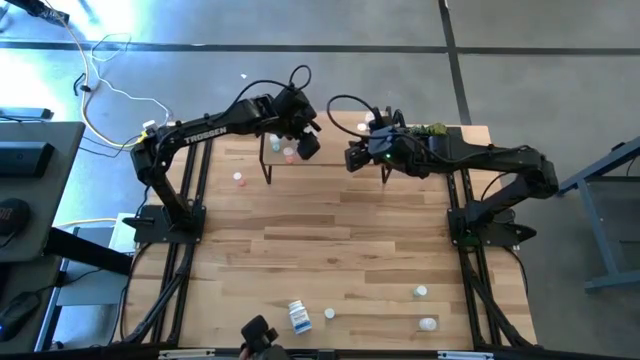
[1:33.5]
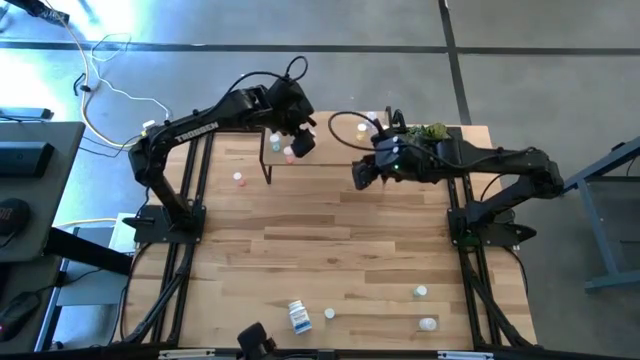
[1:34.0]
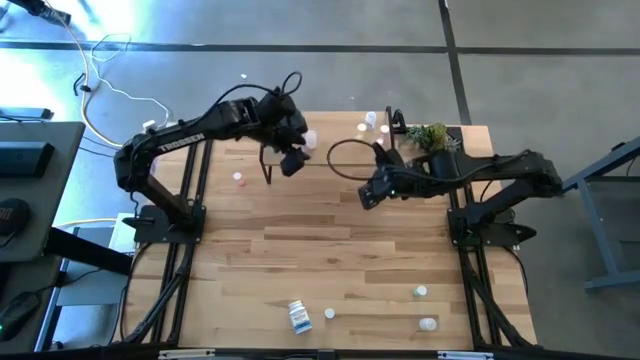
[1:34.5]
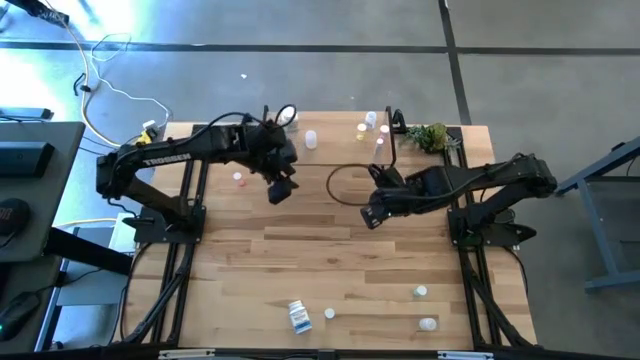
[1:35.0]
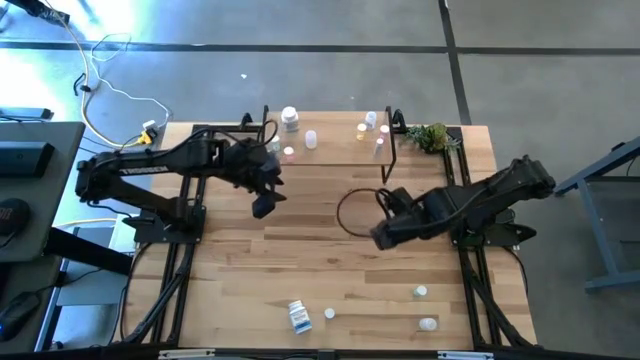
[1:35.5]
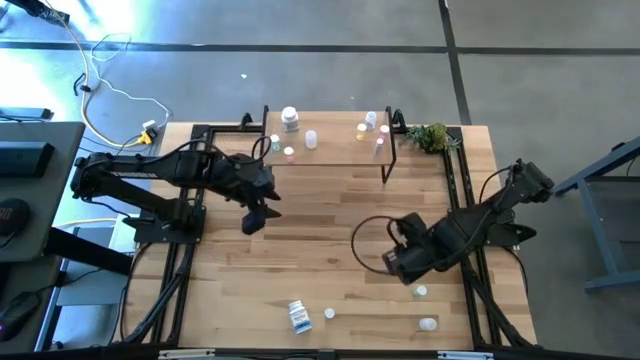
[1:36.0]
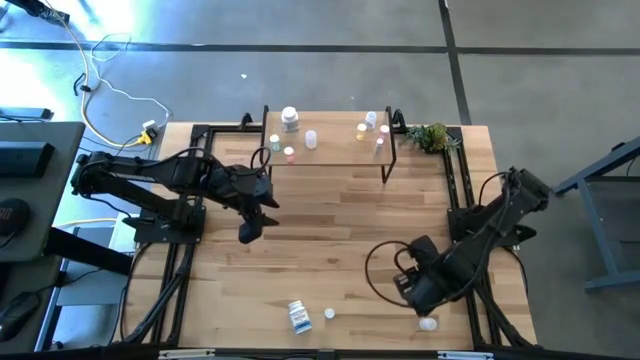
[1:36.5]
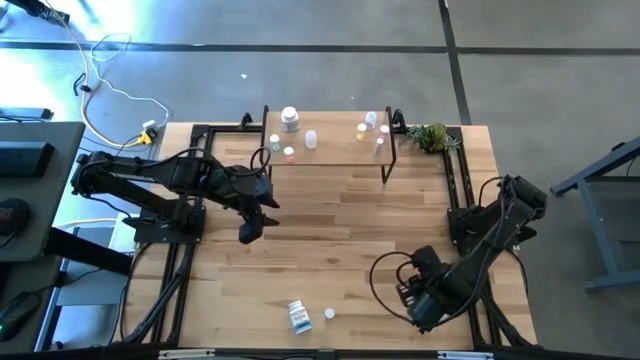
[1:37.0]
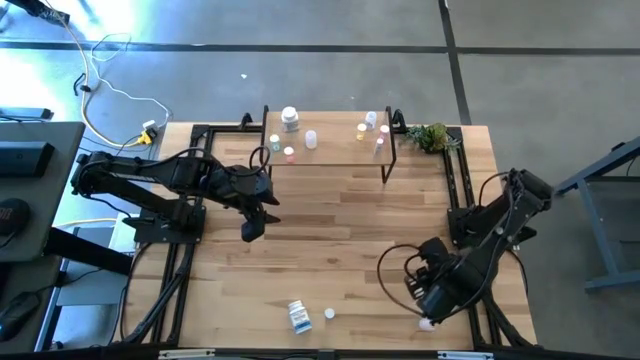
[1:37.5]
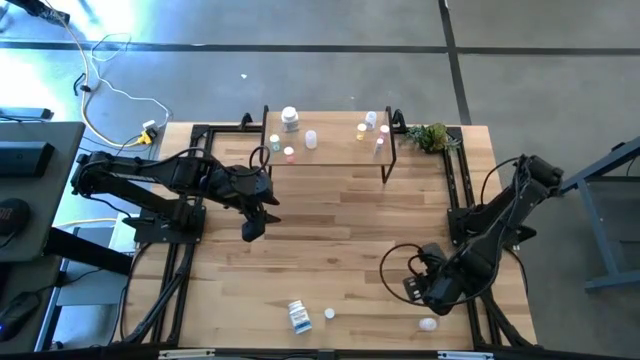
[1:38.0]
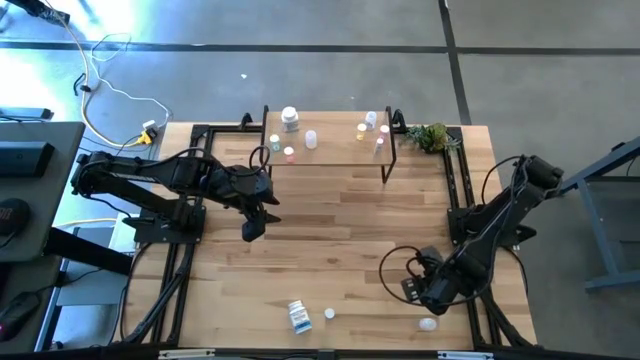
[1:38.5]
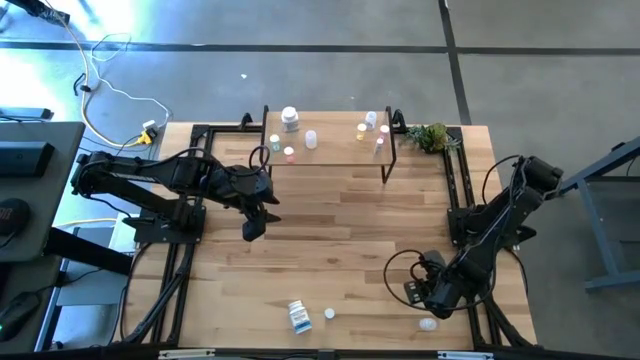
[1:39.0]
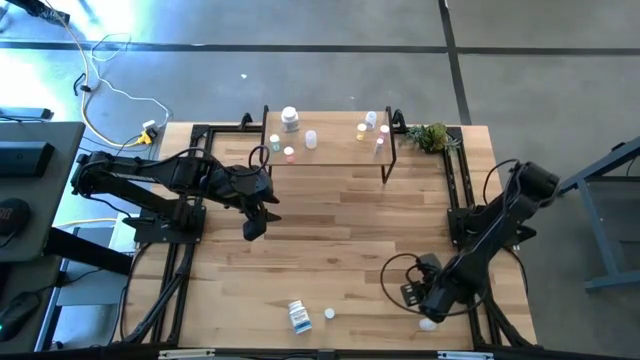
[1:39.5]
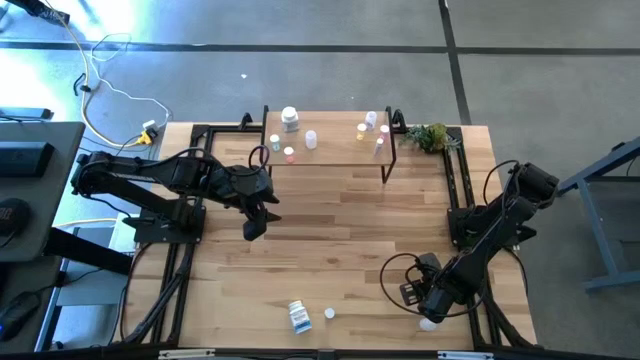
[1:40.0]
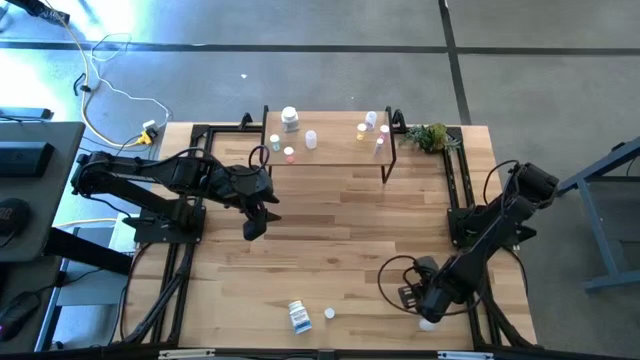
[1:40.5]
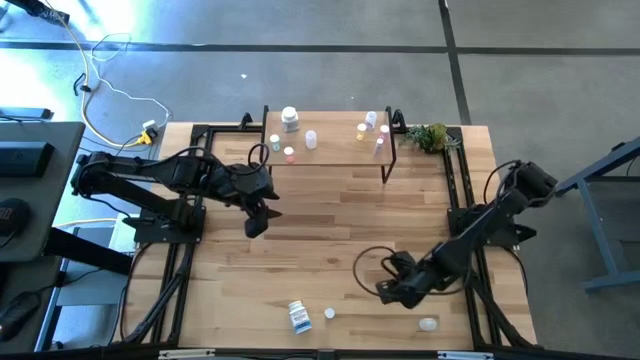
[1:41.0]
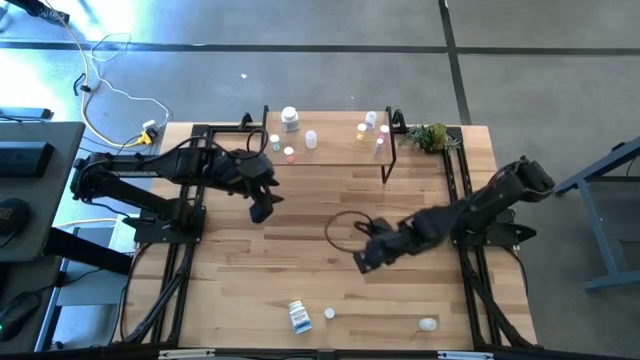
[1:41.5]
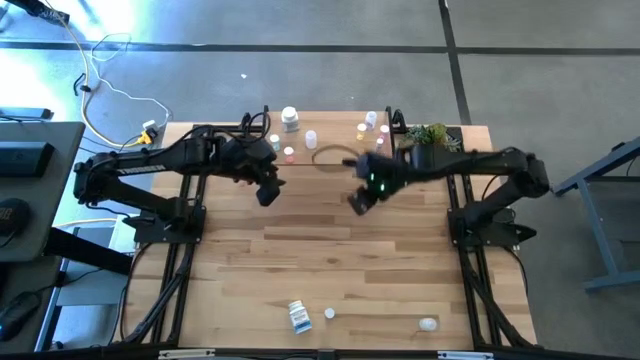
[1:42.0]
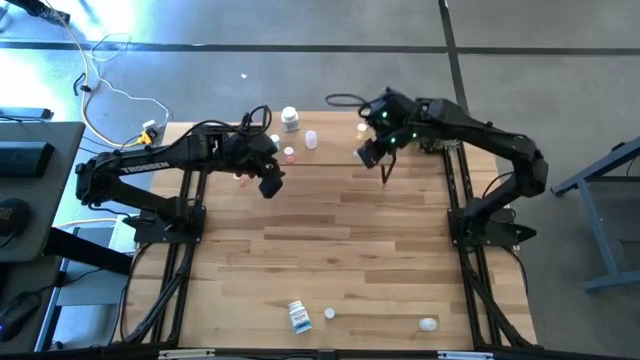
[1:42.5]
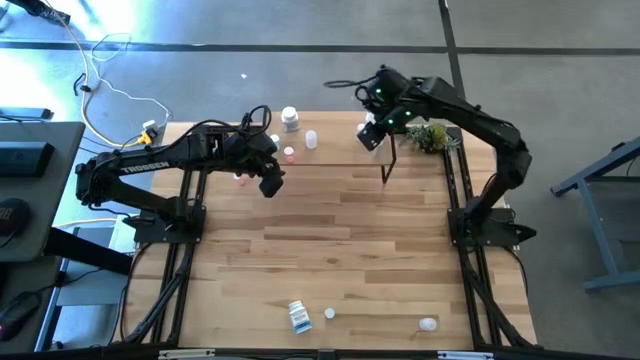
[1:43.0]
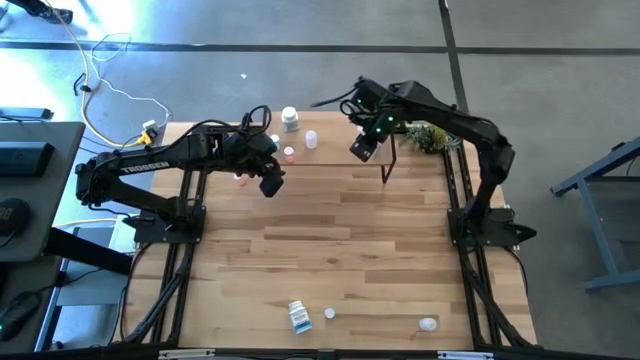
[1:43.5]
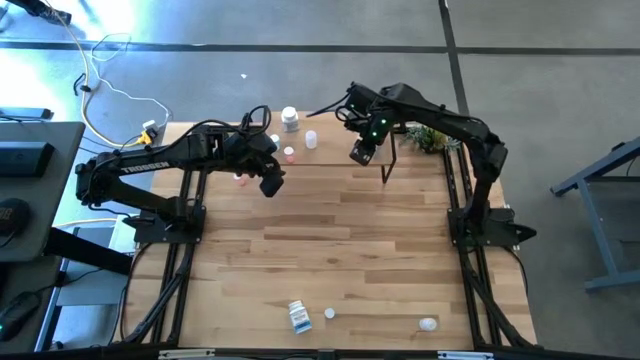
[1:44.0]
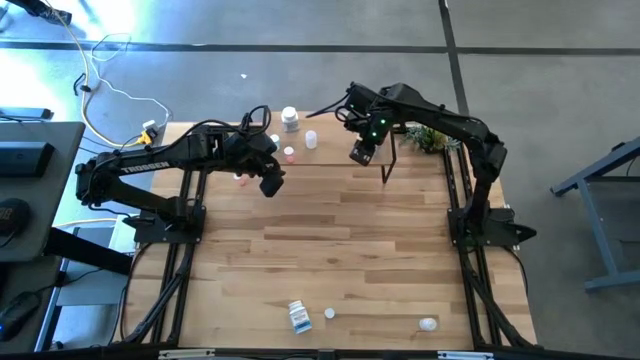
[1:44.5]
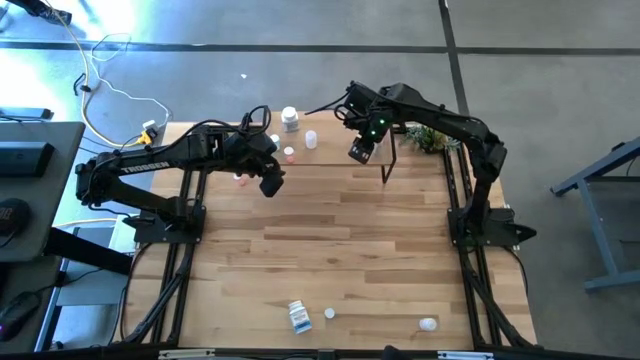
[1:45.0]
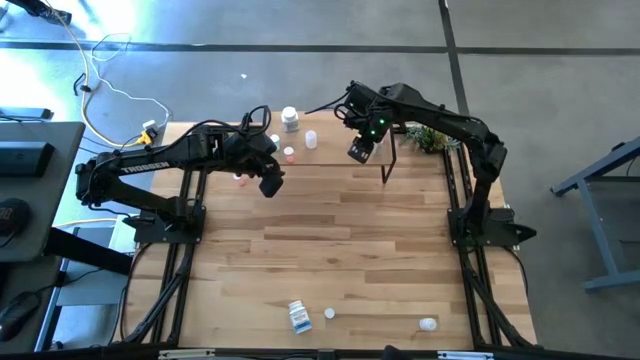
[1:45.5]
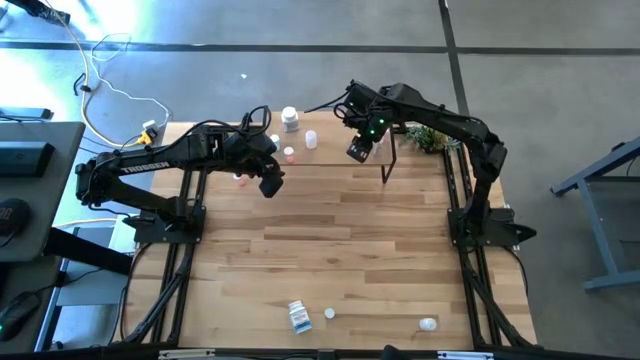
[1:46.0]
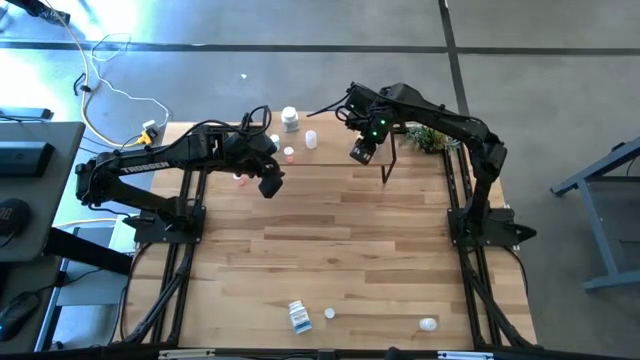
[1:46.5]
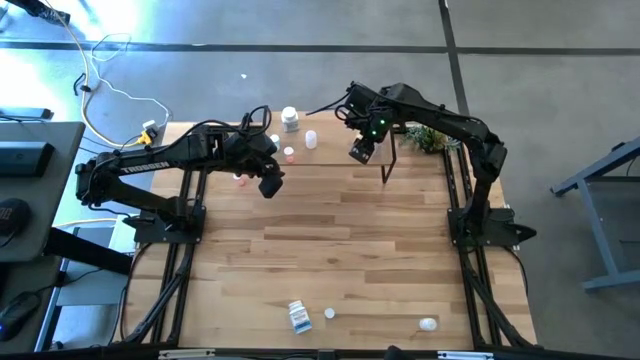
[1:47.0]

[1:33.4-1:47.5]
Task: Pick and place medicine bottles onto shelf by color
Put the right blue pill bottle on the shelf

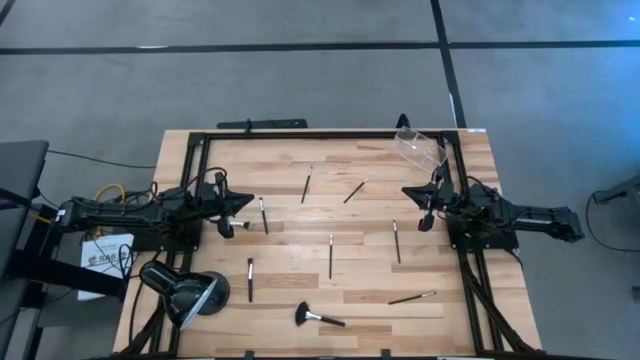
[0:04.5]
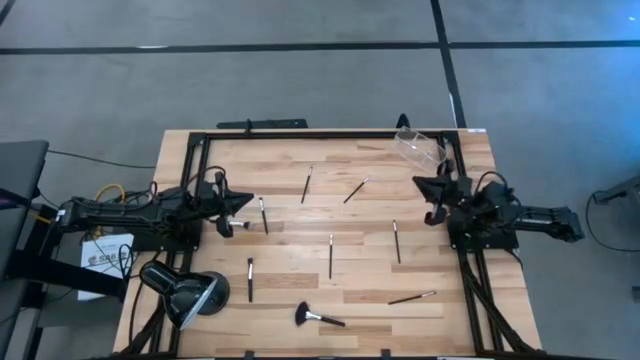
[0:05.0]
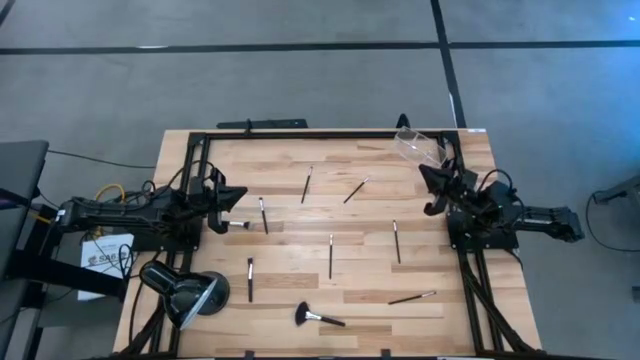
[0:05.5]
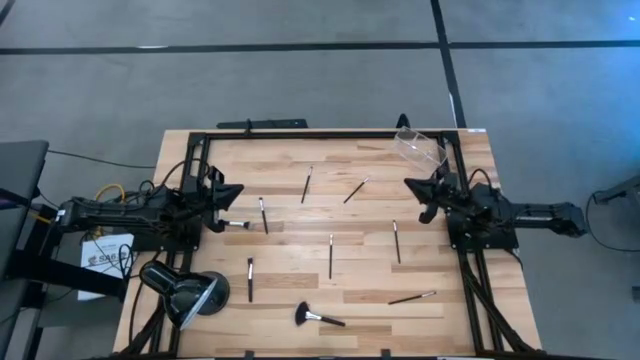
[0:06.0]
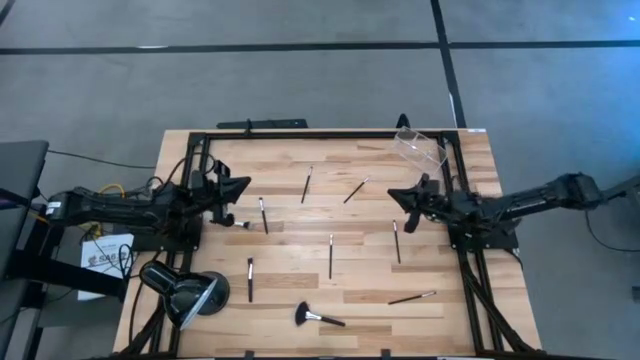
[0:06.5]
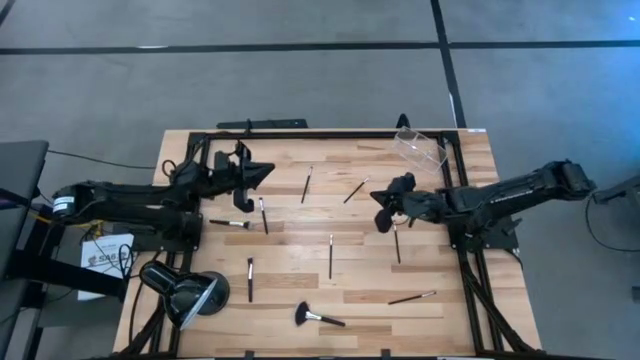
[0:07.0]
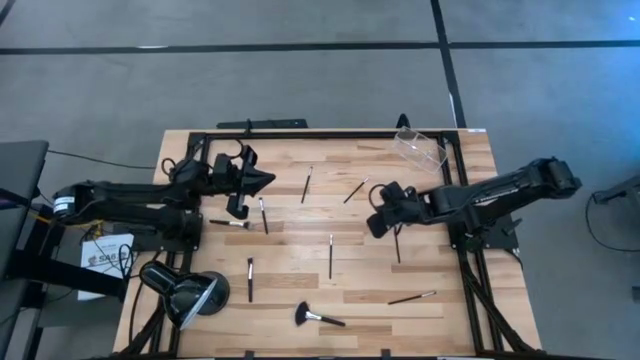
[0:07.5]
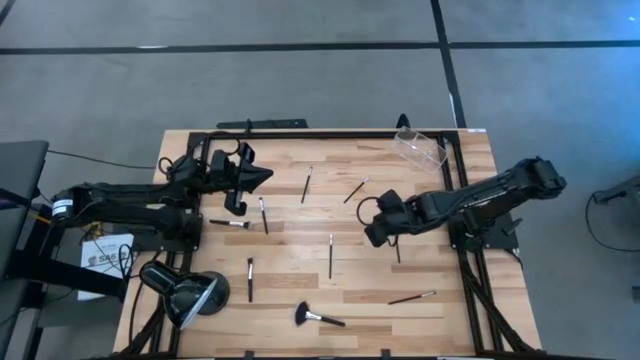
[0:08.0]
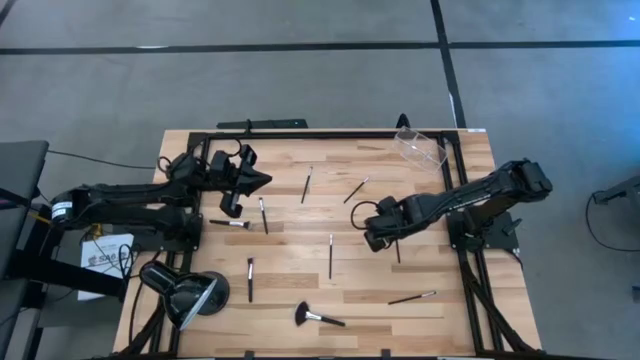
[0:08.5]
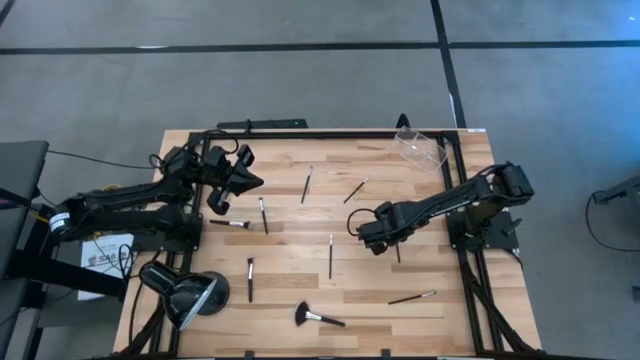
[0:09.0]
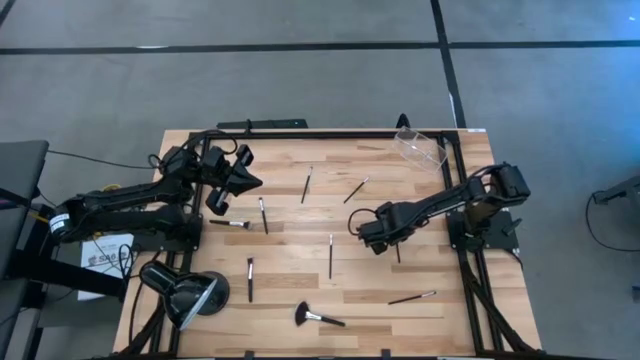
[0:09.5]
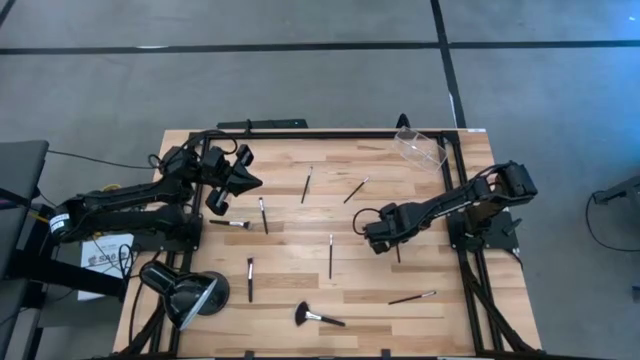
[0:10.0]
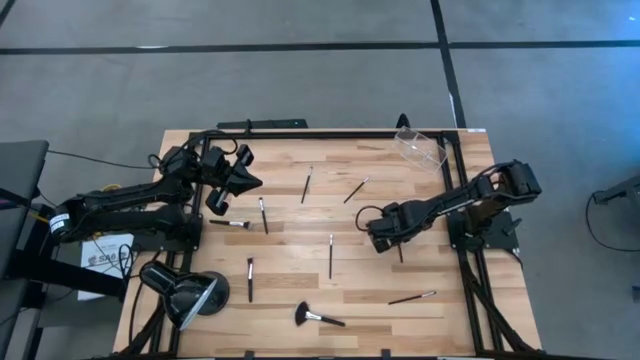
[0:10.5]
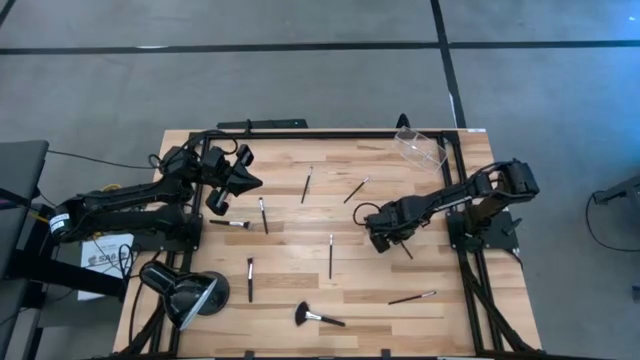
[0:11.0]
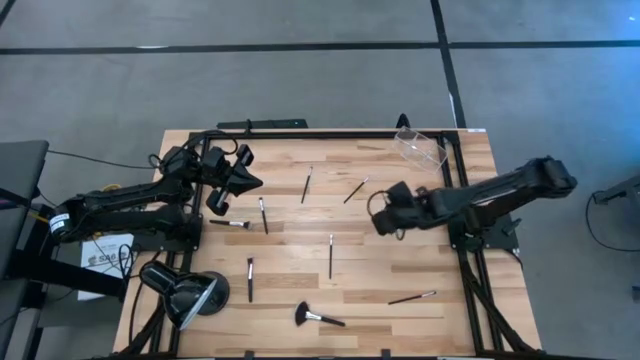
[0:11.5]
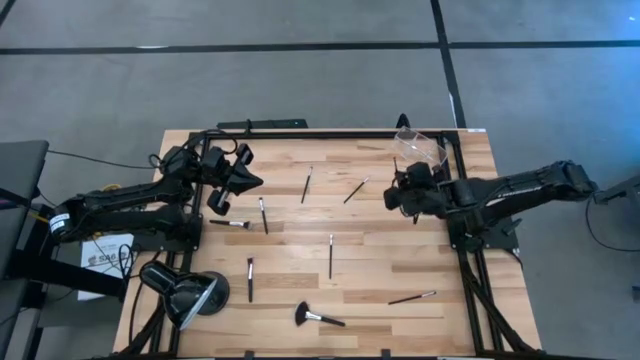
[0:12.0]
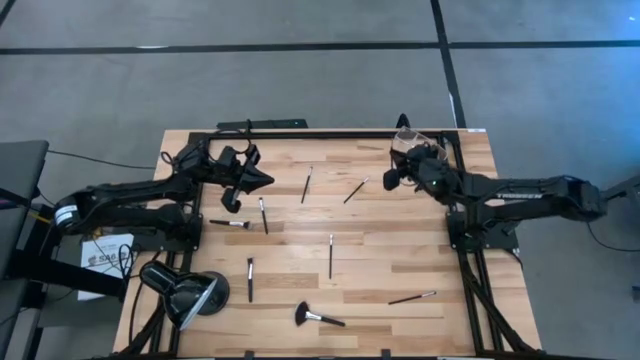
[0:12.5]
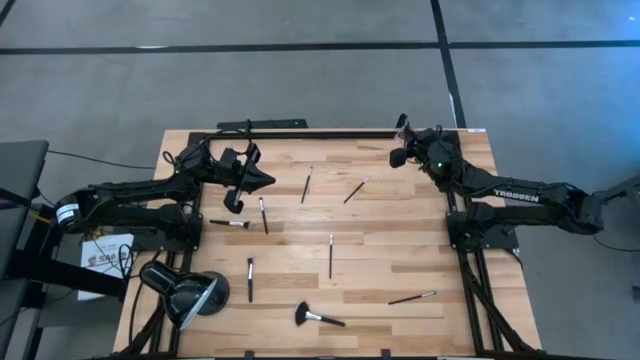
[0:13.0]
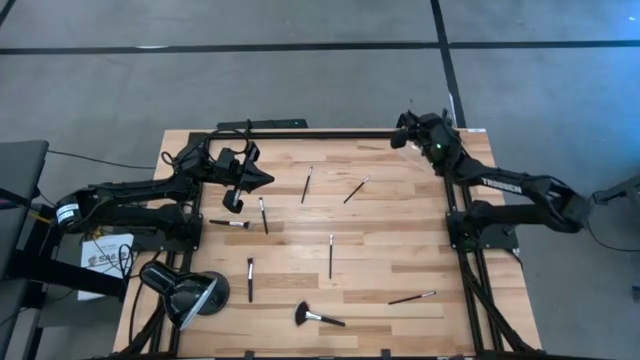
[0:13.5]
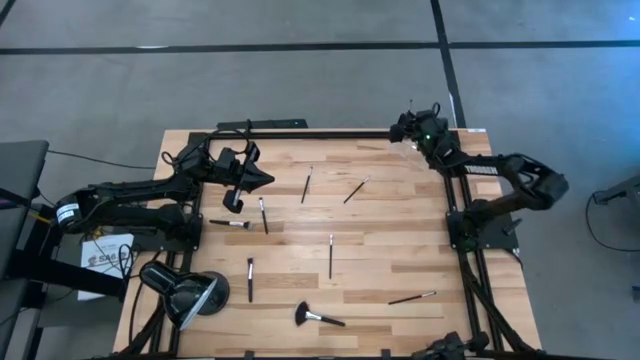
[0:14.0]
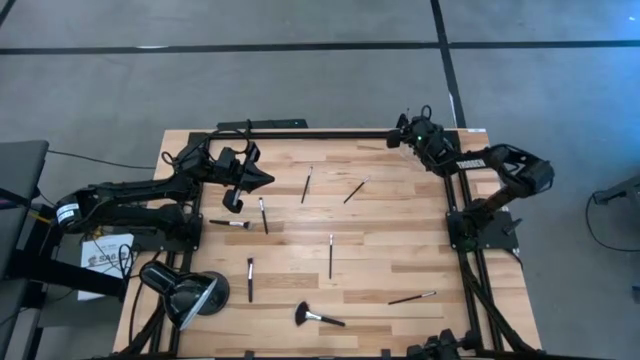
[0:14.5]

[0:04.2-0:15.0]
Task: Put items in baskets/containers
Put the black eyeshadow brush into the transparent organizer
